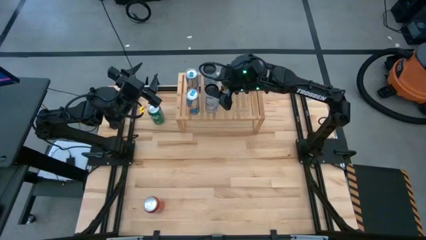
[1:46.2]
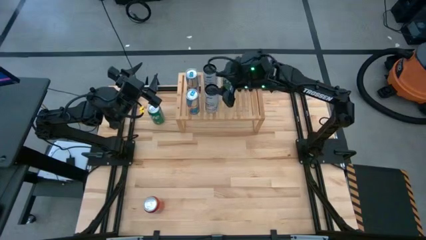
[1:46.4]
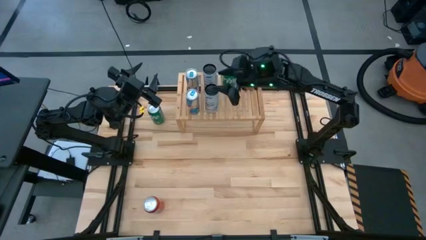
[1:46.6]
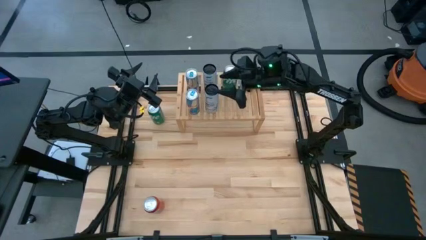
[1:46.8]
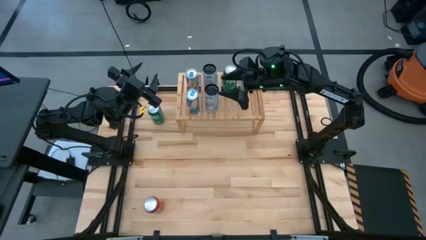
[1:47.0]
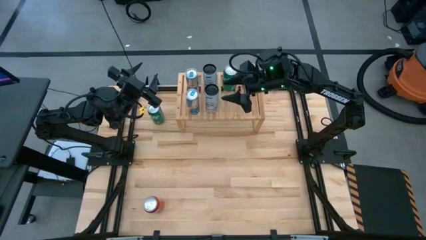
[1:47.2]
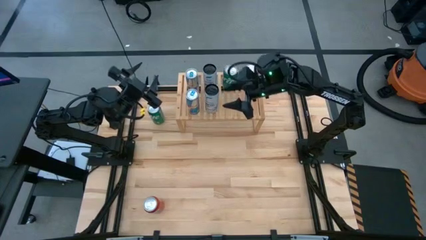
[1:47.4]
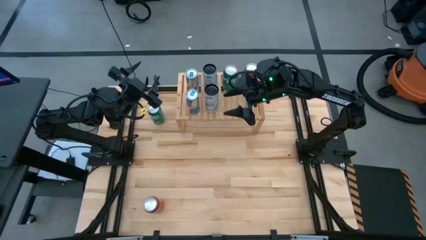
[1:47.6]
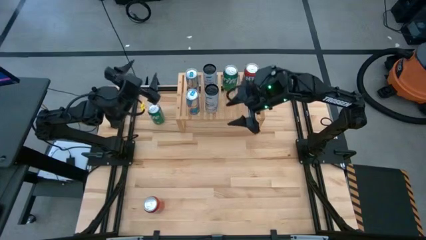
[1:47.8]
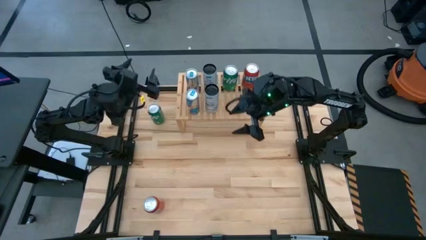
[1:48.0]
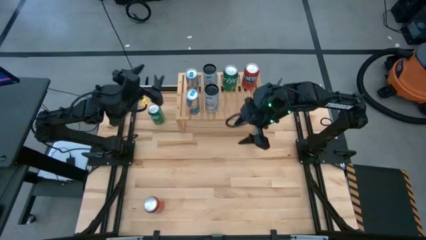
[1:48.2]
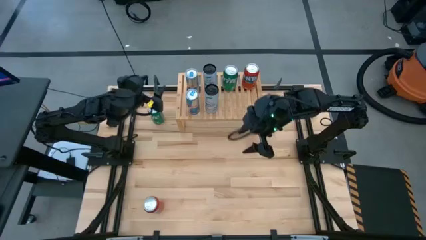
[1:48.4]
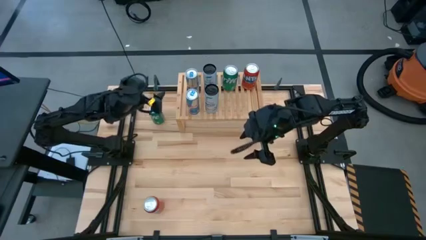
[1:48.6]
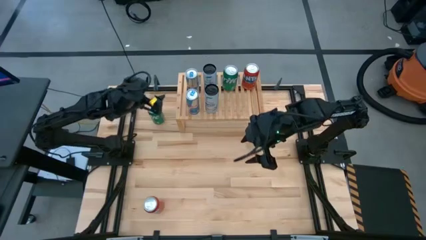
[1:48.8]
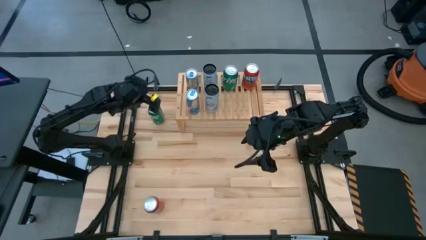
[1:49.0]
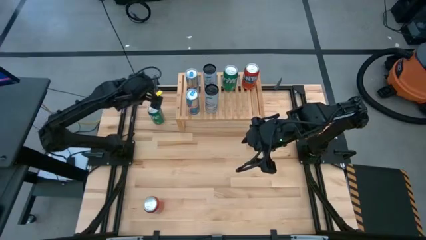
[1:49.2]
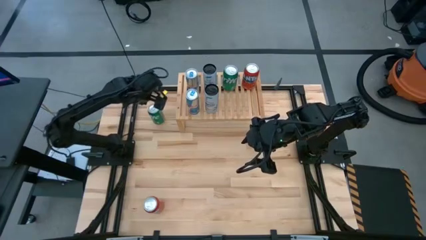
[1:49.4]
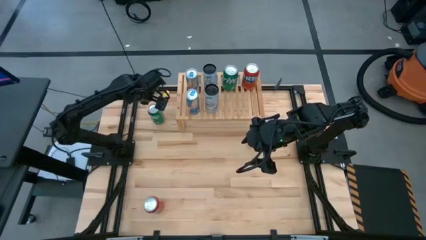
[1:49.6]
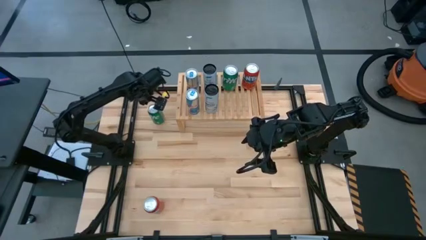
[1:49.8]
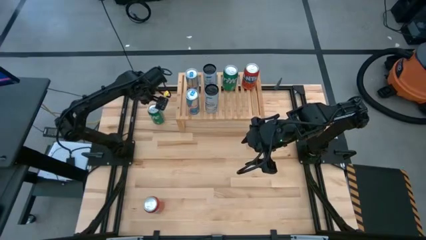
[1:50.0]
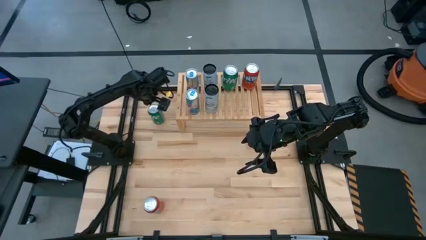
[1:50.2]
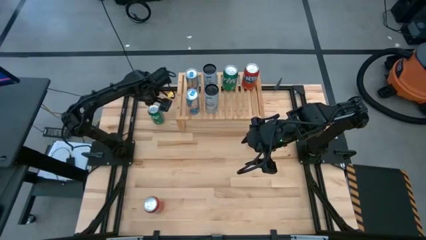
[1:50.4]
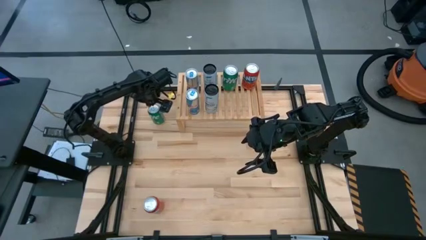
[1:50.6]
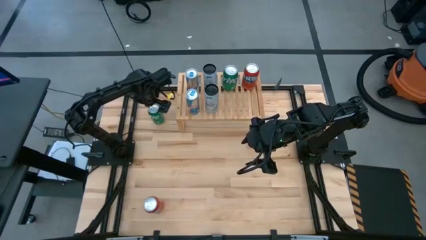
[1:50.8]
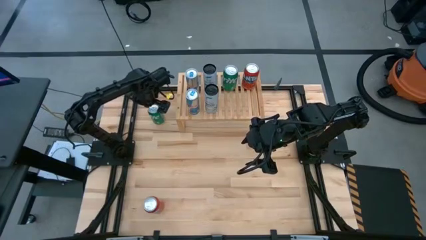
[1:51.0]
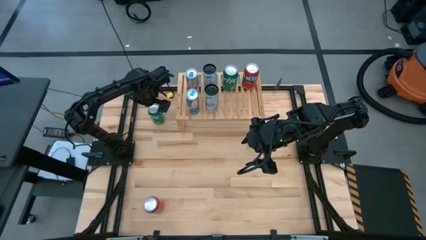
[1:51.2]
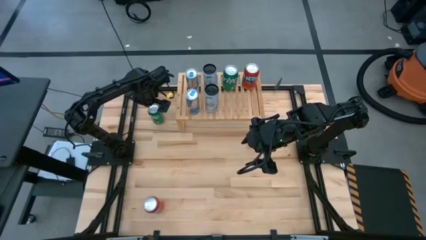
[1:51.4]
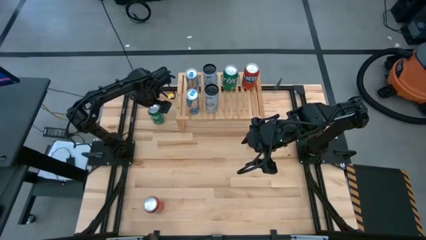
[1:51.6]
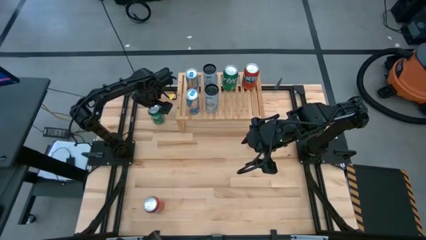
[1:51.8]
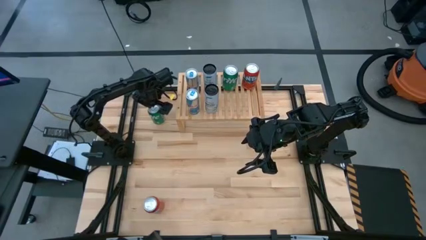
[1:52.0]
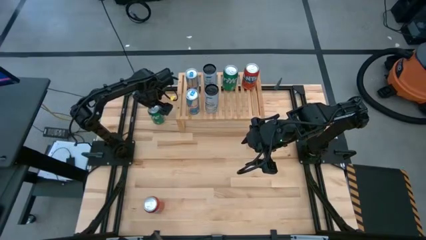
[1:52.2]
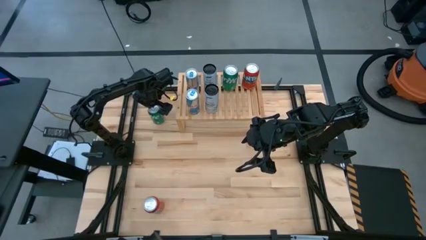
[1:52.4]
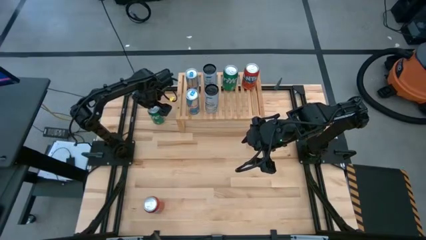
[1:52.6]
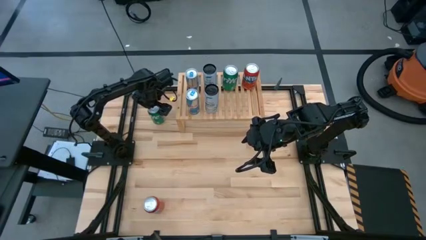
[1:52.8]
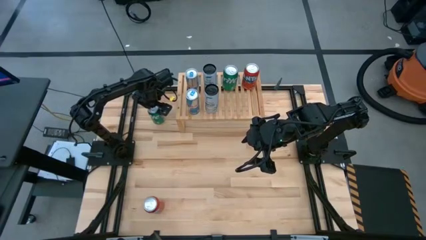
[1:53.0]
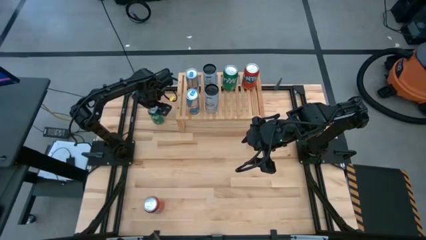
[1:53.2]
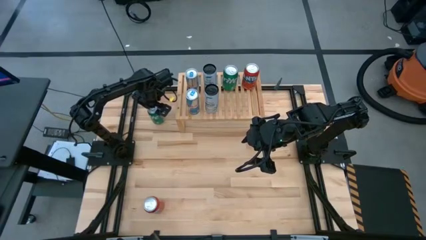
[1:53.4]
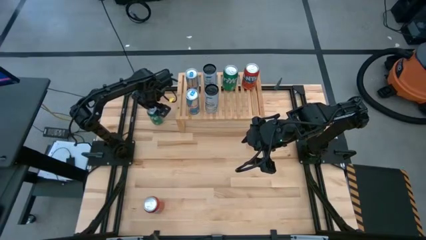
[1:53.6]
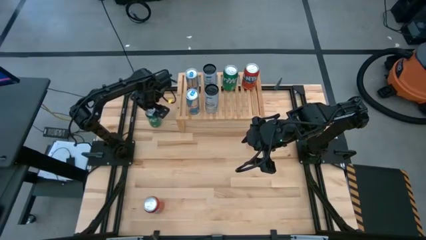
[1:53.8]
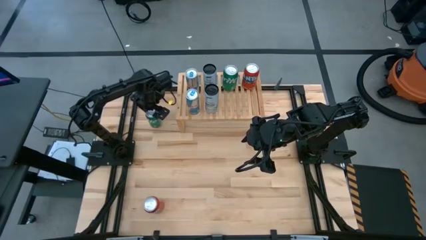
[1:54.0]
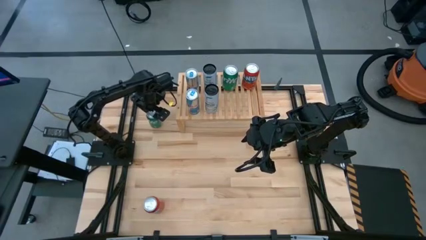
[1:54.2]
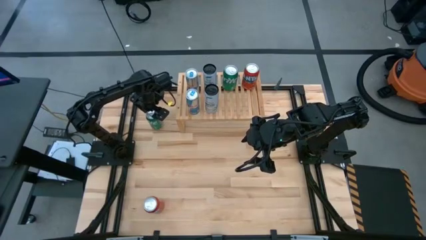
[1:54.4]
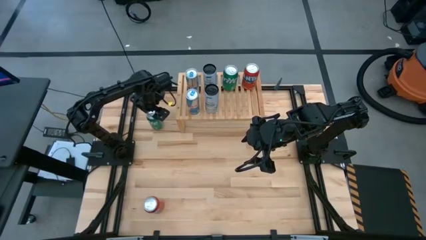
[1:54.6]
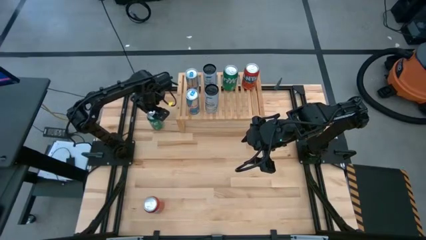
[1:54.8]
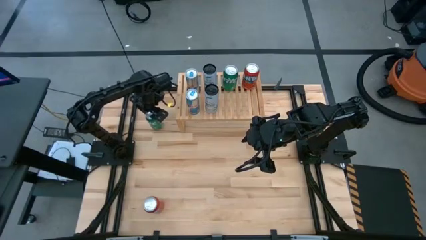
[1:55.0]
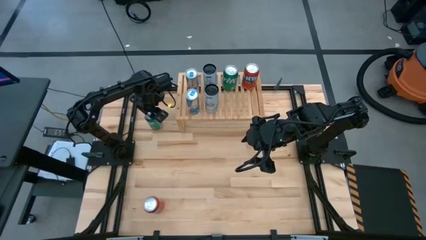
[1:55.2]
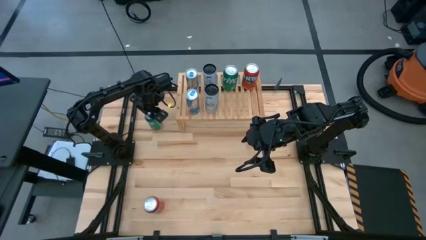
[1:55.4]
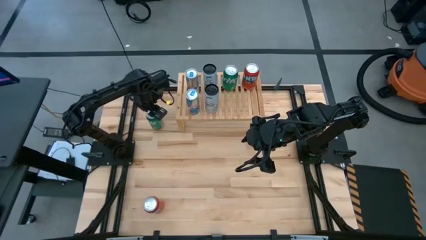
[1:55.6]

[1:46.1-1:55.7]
Task: Place canned beverage on shelf
Put the green soda can aligned with the other green soda can on the shelf
